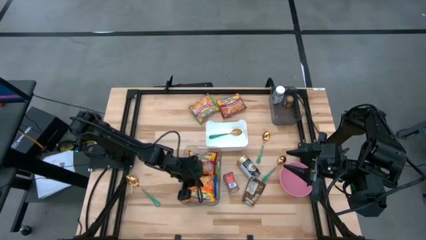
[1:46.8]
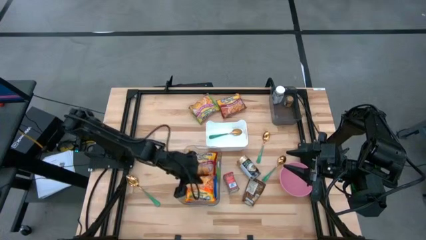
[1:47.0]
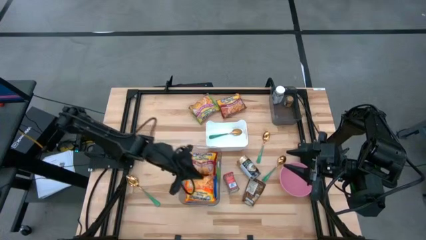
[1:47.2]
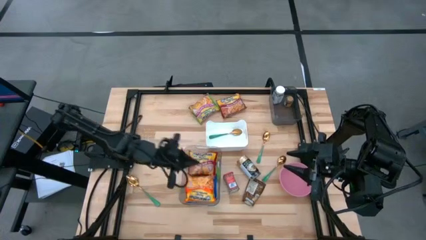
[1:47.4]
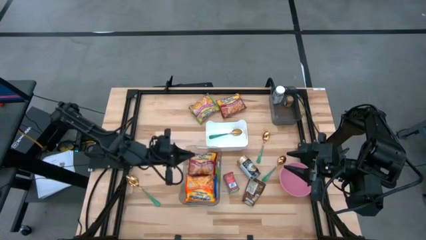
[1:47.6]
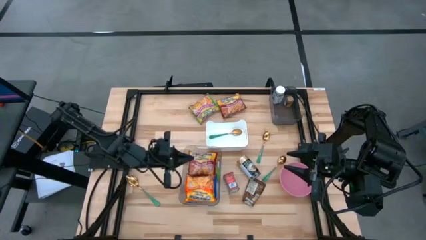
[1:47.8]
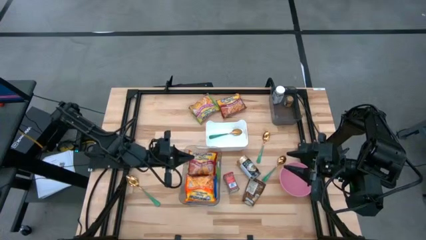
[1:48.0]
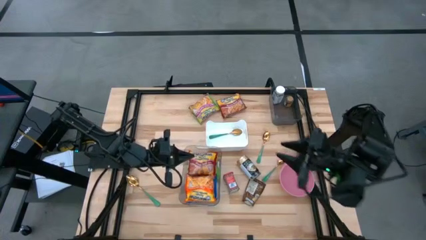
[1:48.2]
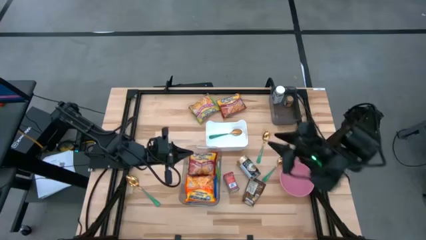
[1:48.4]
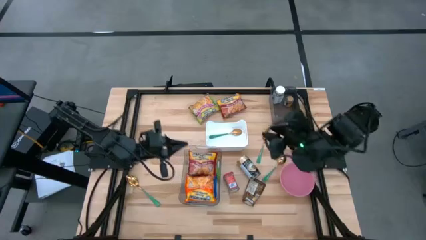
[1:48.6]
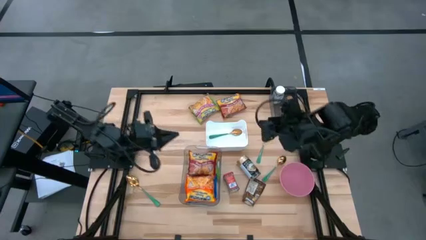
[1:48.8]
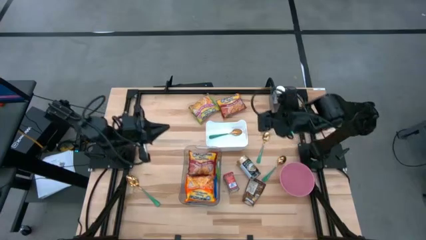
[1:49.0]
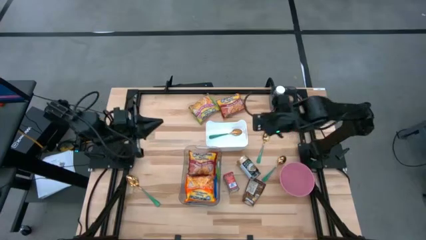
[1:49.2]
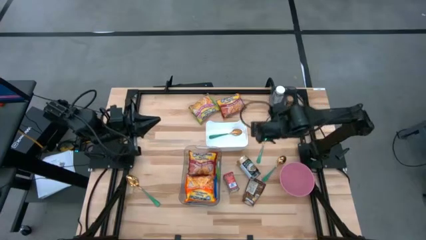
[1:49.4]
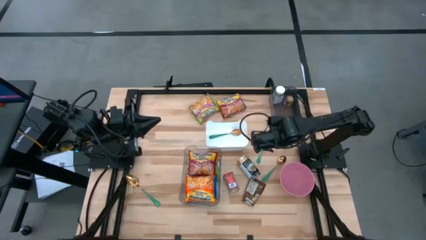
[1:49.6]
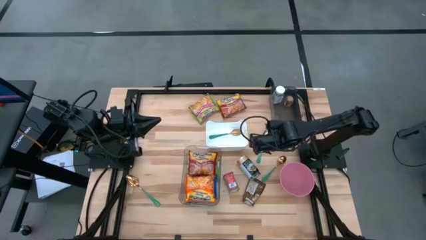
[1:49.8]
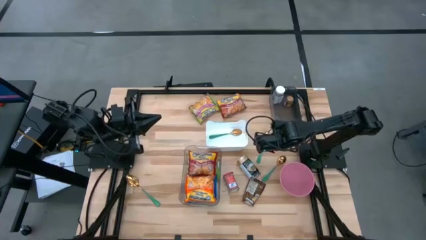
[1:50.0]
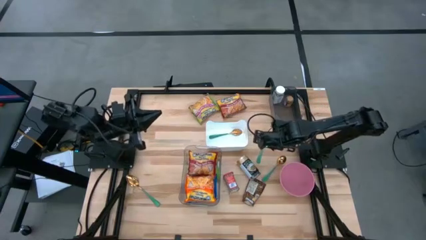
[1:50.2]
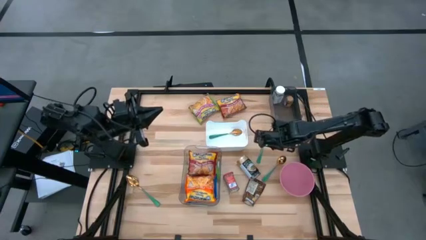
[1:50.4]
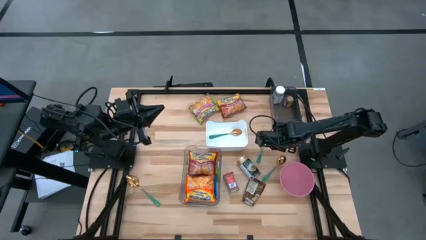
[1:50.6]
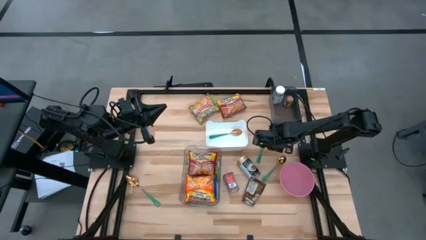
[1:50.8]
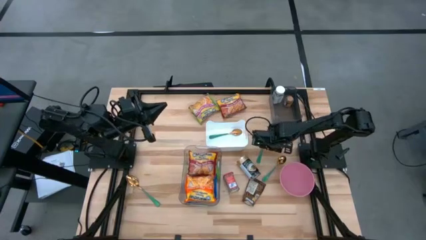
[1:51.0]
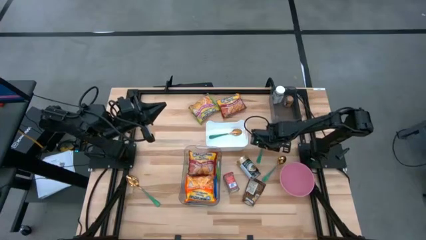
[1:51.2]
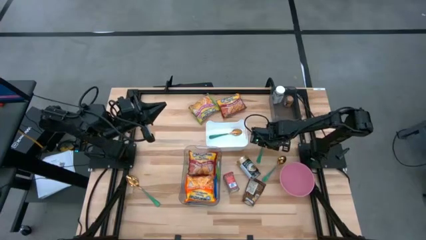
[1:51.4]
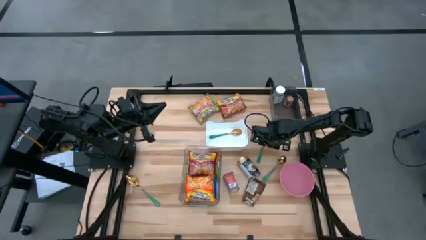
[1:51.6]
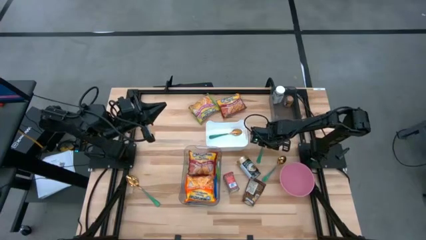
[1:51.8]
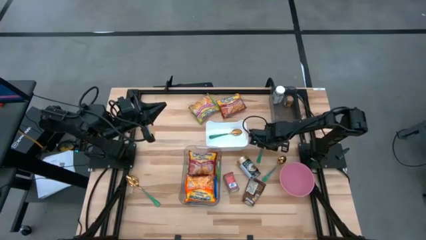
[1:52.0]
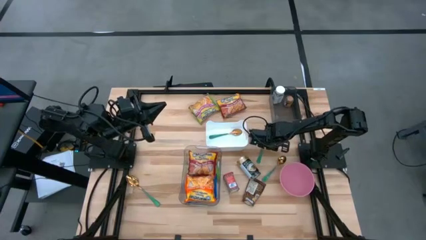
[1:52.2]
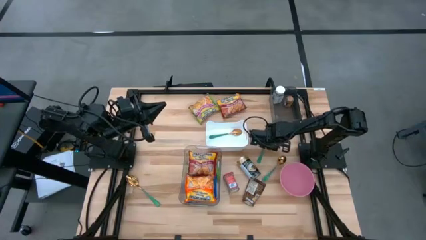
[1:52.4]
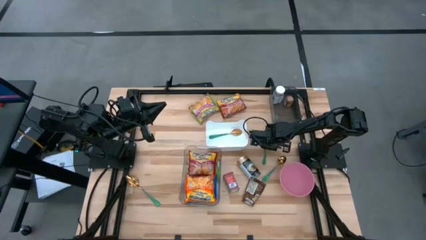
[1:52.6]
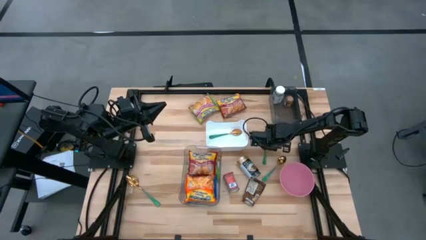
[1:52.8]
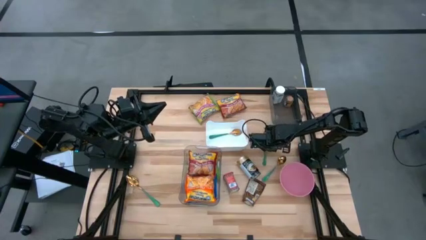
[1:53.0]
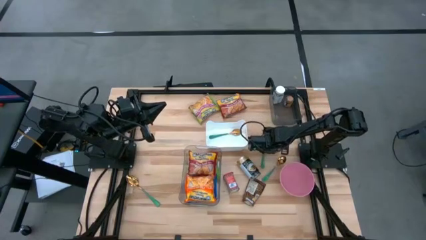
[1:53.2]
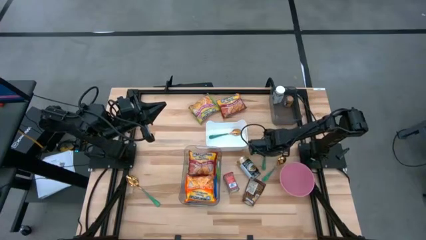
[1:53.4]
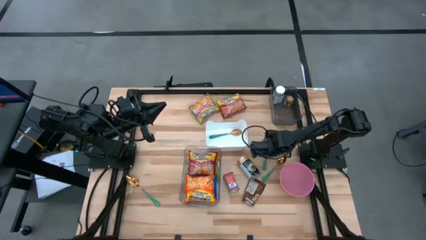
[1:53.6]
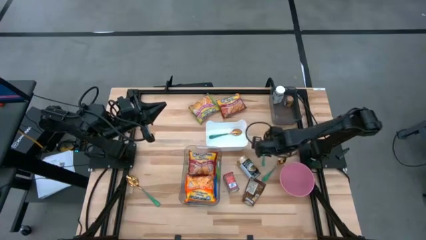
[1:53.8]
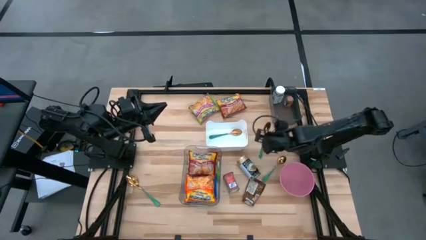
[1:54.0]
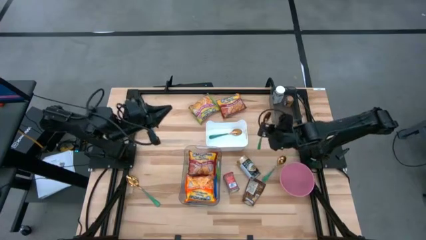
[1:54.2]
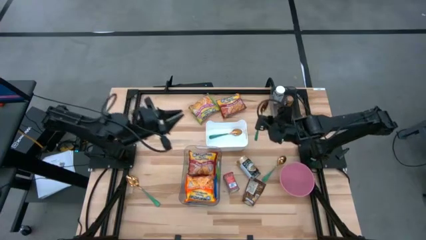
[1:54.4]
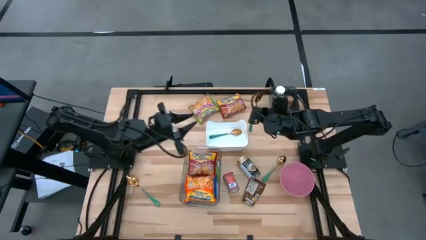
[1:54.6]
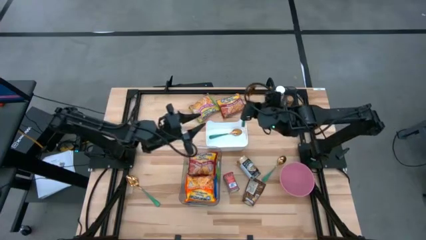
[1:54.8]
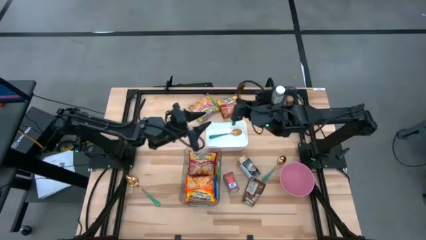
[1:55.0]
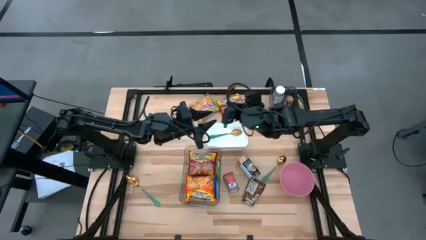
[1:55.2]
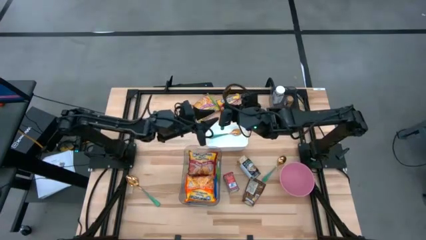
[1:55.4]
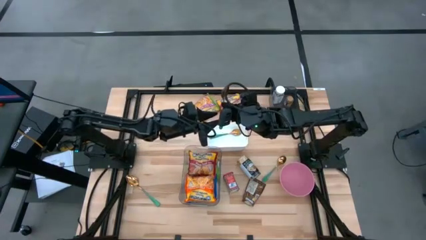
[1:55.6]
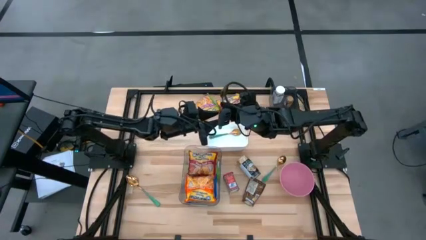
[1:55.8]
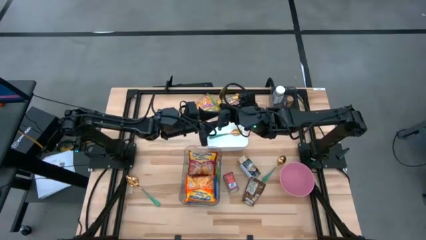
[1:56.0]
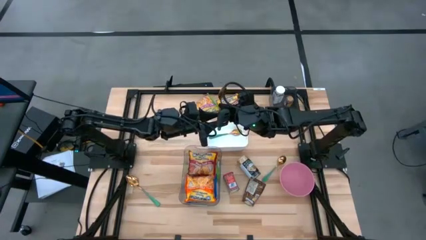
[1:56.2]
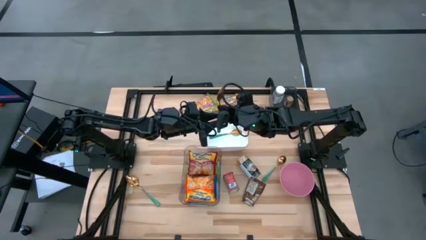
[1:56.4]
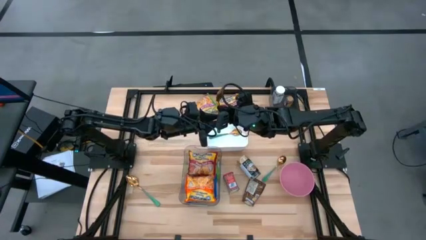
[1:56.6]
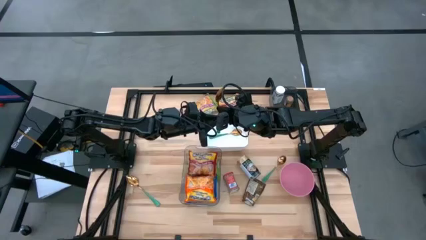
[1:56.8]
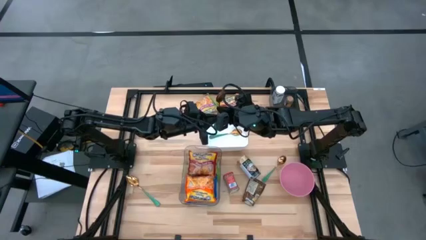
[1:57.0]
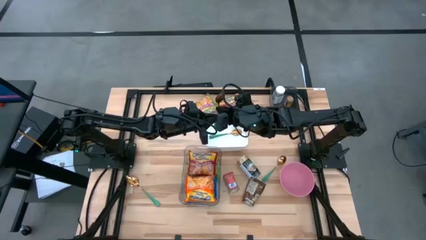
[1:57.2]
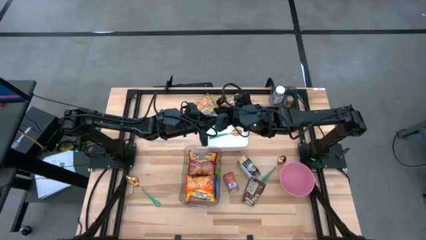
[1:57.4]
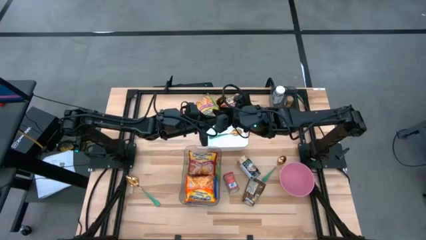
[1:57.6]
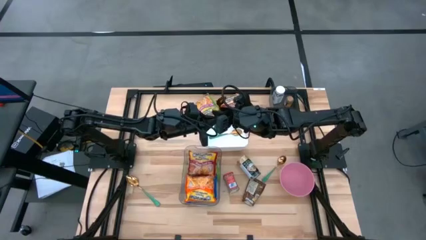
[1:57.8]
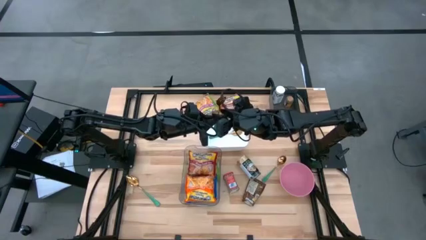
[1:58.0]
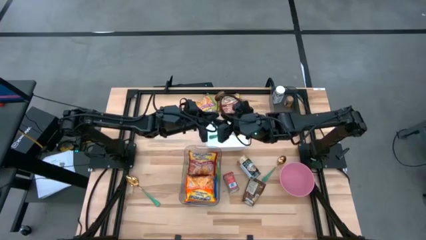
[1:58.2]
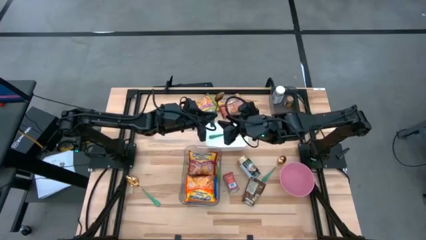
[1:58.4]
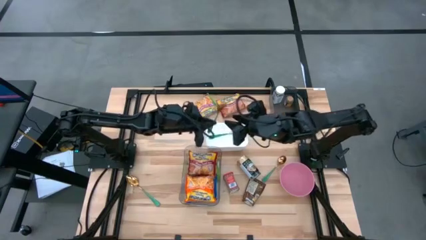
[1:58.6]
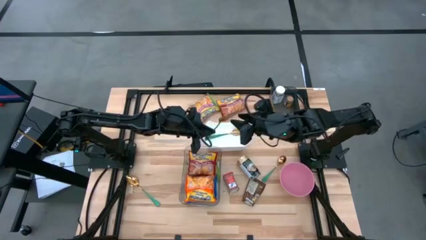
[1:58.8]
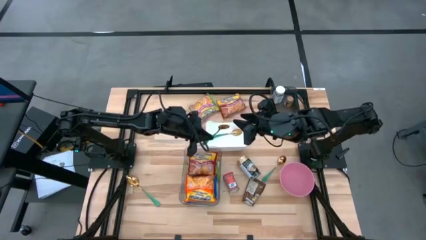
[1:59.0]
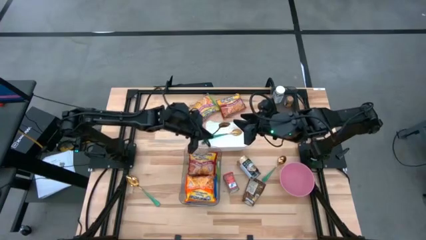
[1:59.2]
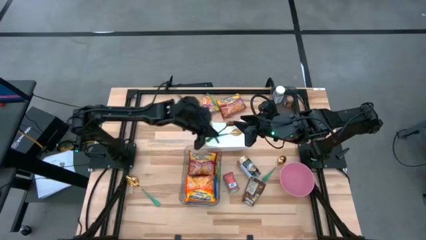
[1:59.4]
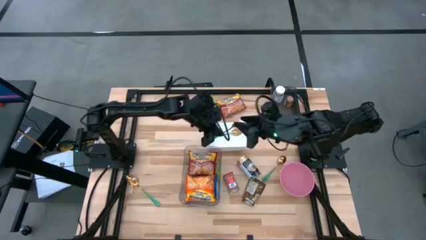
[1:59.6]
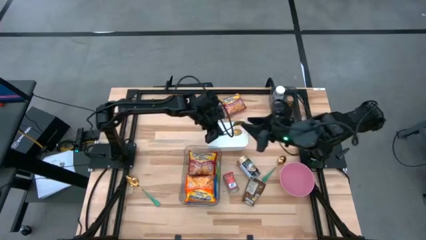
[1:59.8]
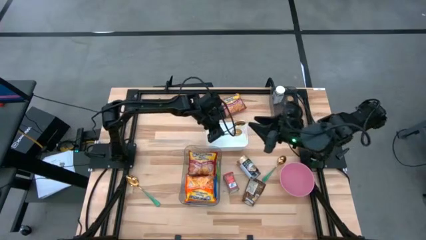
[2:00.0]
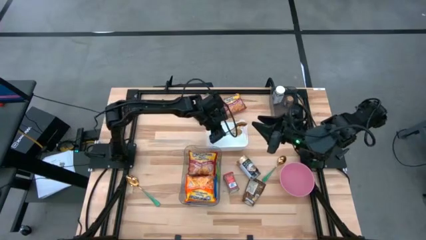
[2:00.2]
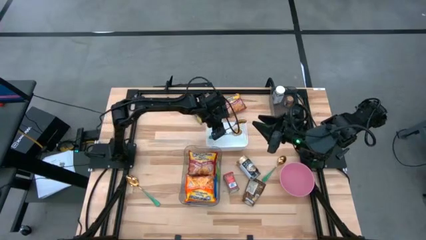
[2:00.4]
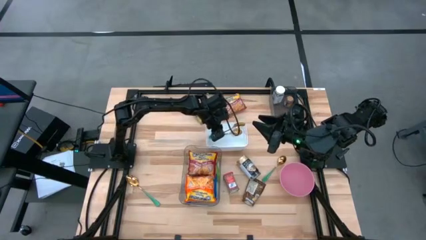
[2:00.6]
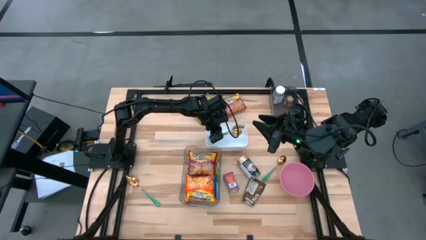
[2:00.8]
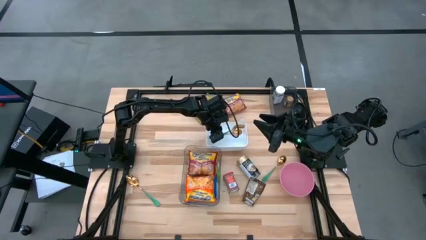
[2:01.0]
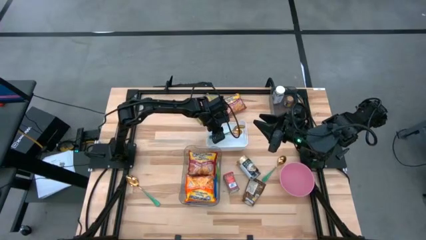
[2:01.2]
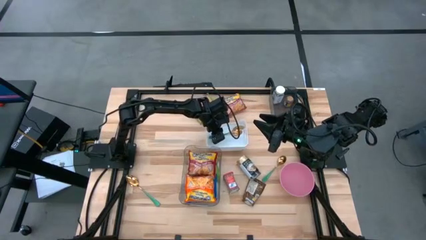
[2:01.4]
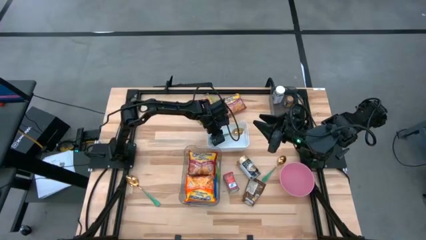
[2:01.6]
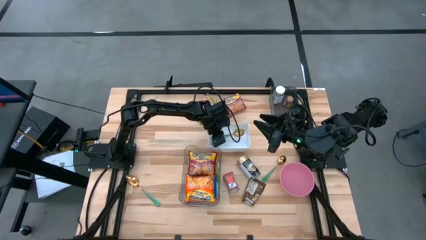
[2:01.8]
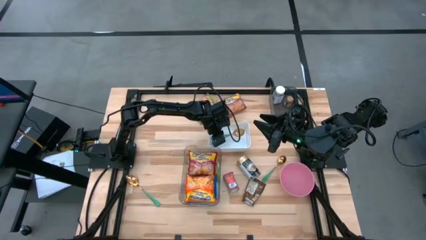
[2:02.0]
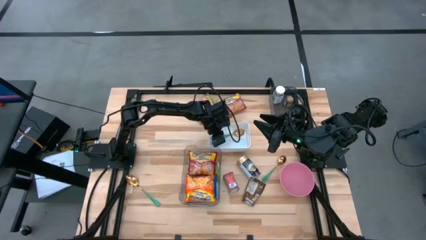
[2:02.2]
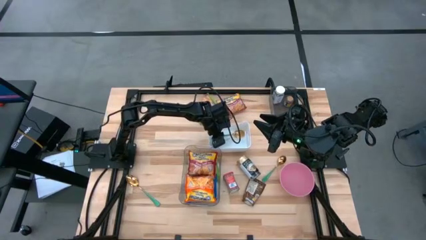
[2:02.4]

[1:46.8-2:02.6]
Task: Pick & Place Food Item
Put the green spoon into the white bin
